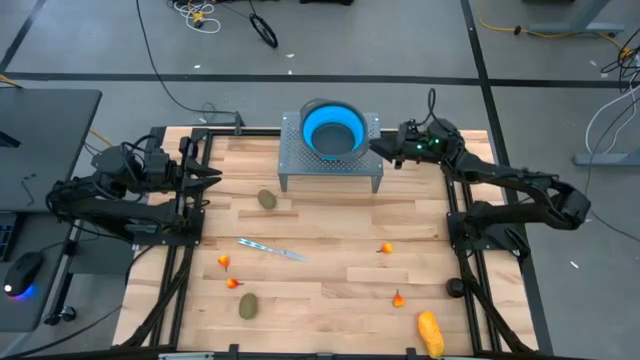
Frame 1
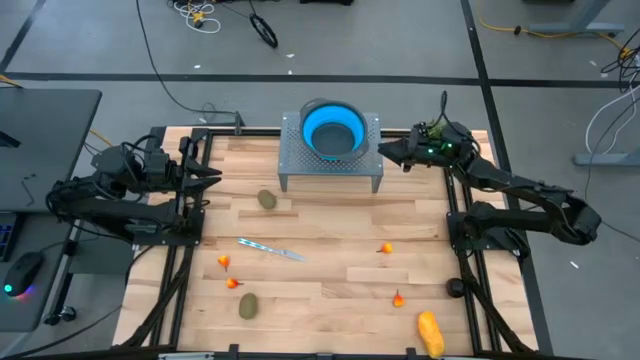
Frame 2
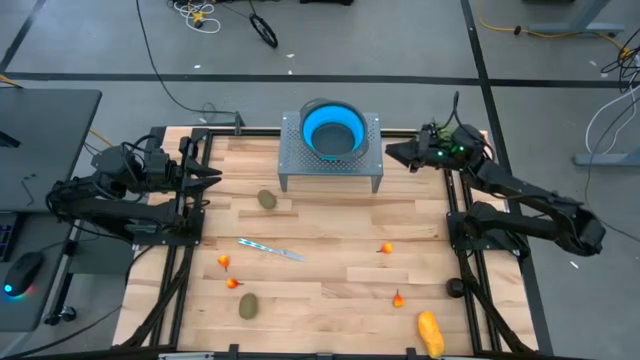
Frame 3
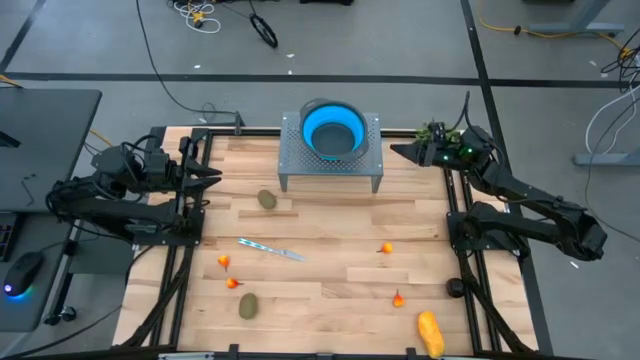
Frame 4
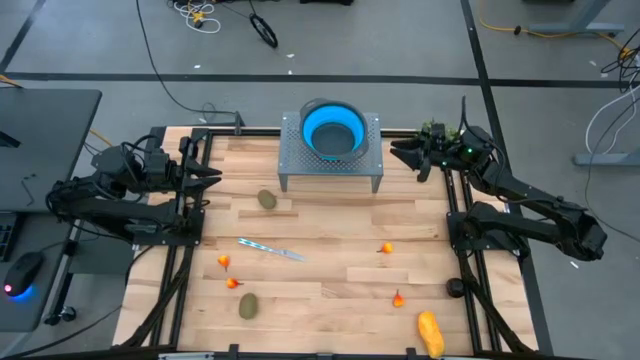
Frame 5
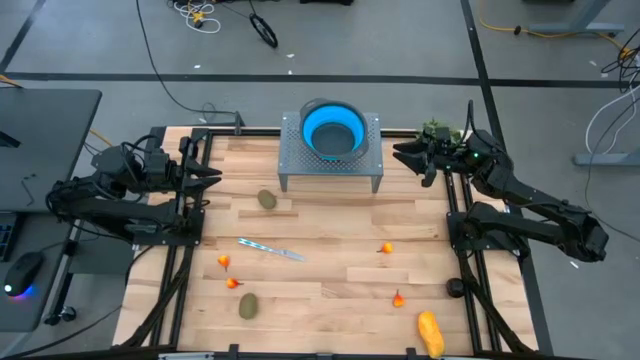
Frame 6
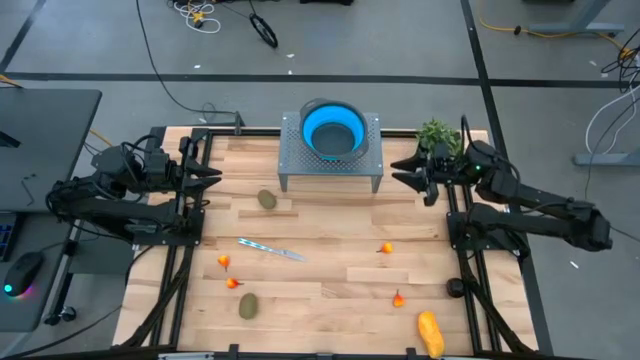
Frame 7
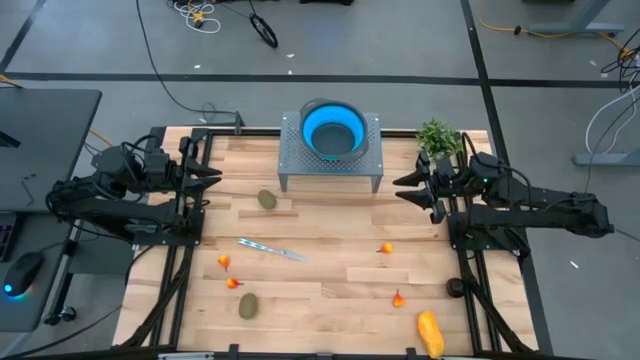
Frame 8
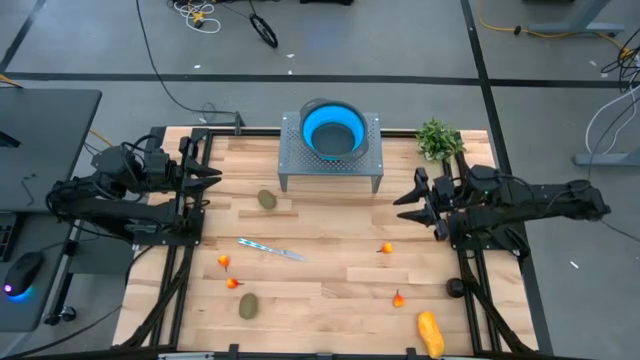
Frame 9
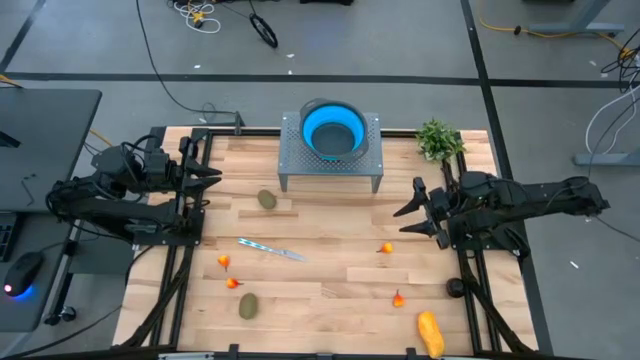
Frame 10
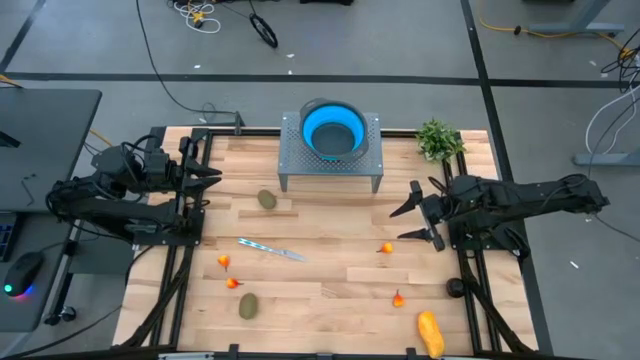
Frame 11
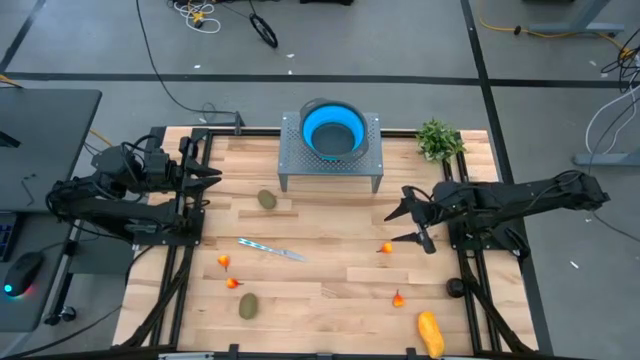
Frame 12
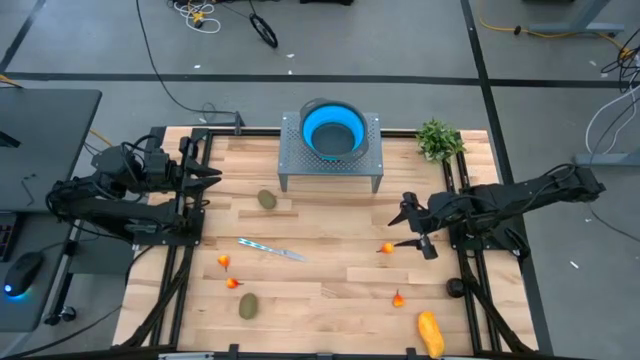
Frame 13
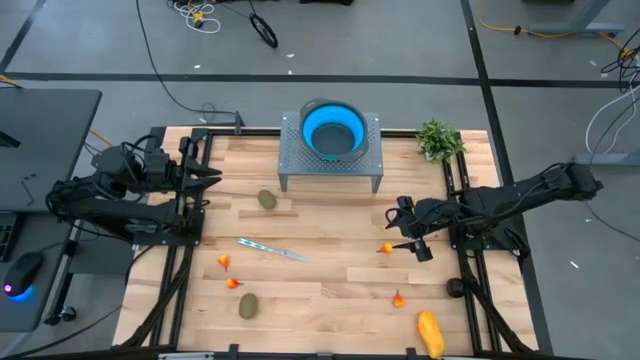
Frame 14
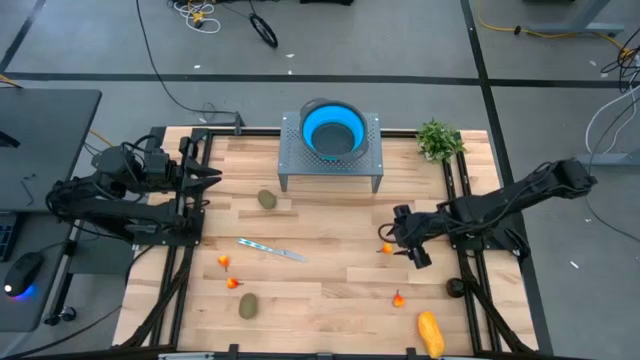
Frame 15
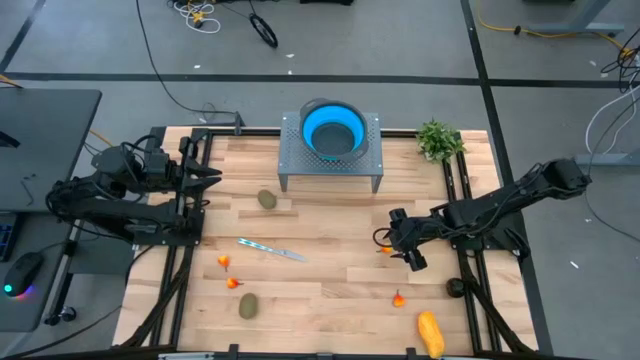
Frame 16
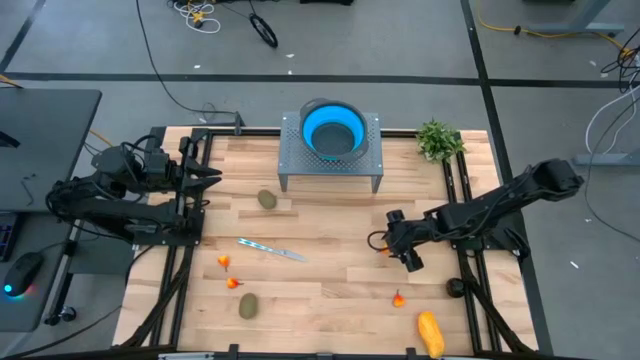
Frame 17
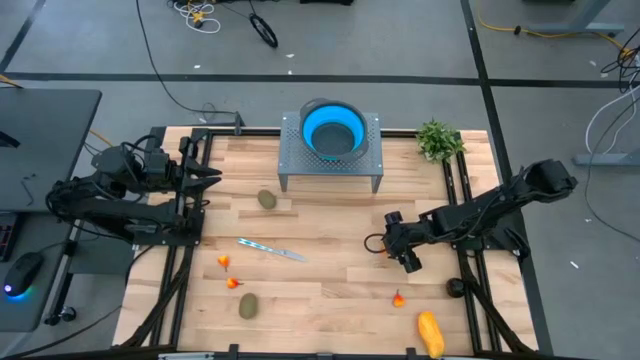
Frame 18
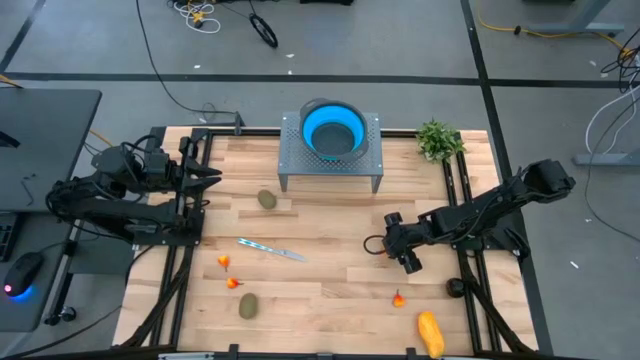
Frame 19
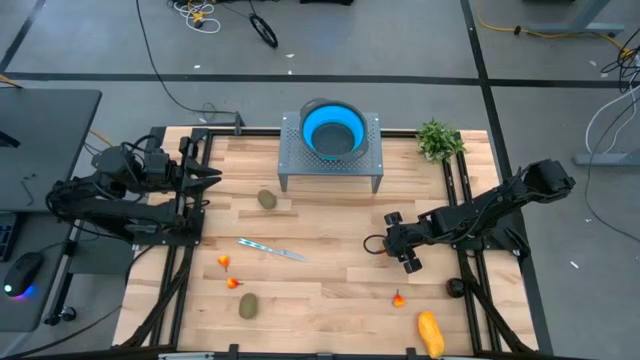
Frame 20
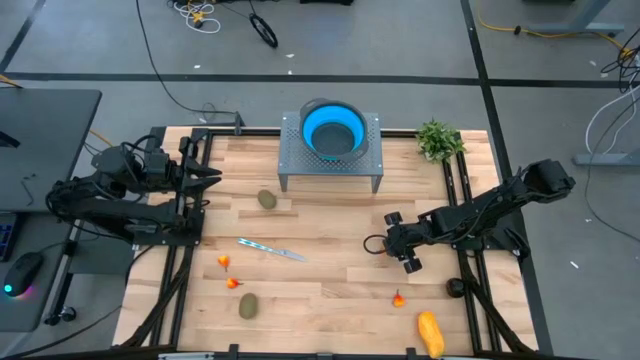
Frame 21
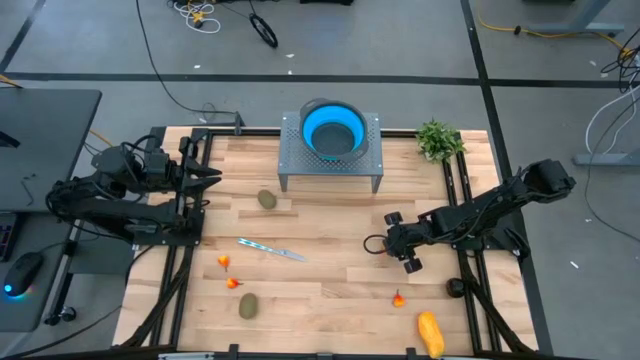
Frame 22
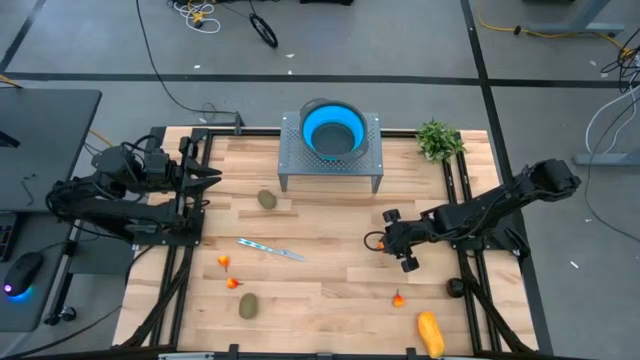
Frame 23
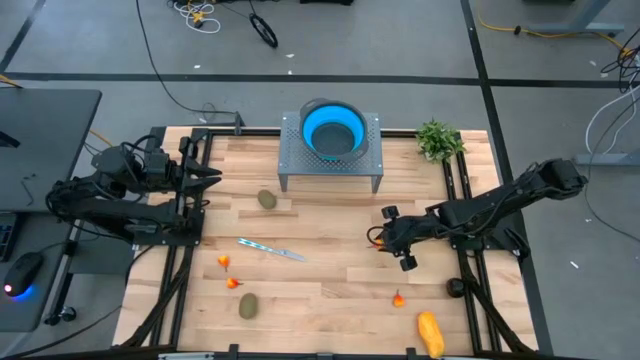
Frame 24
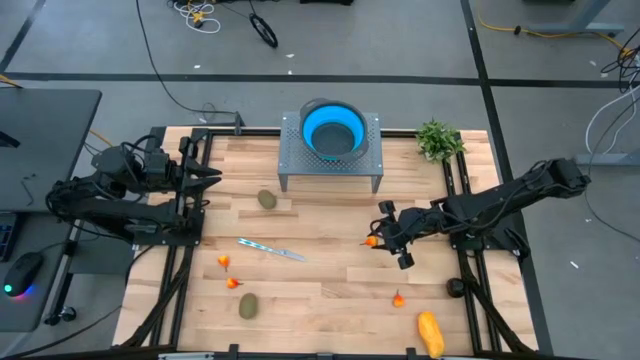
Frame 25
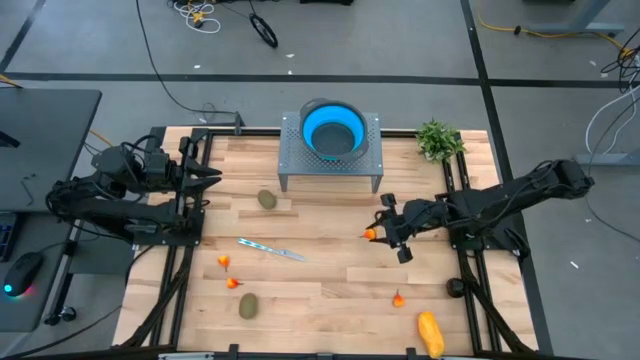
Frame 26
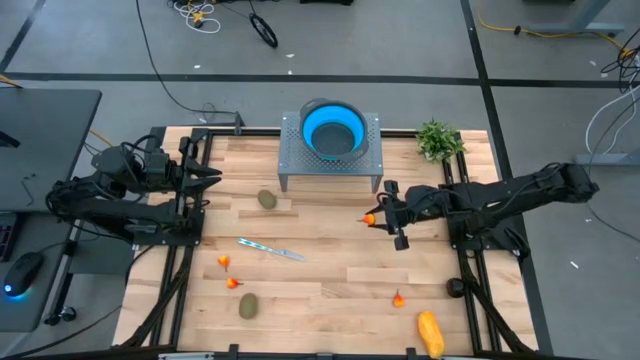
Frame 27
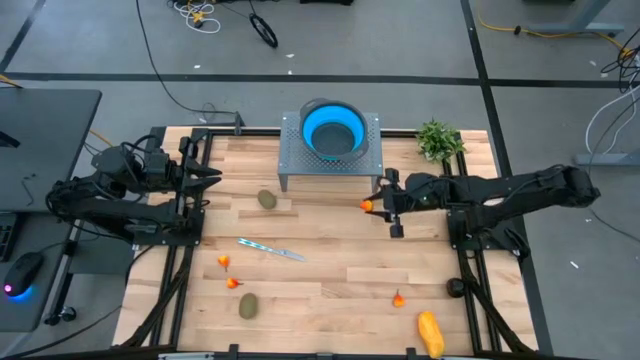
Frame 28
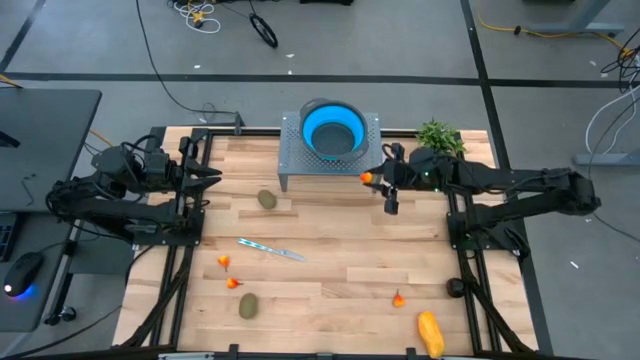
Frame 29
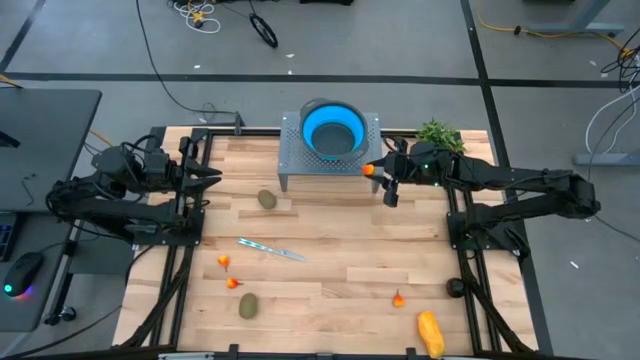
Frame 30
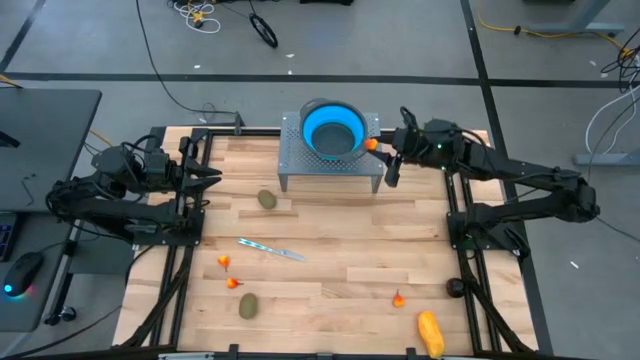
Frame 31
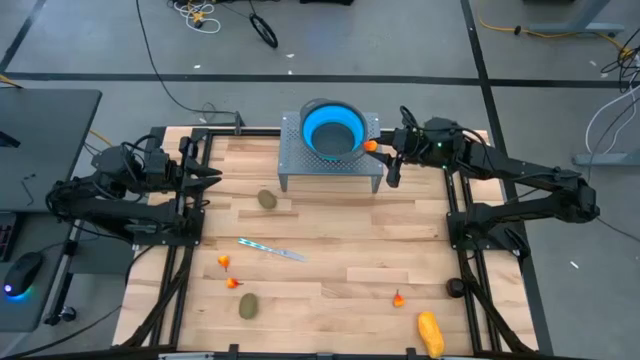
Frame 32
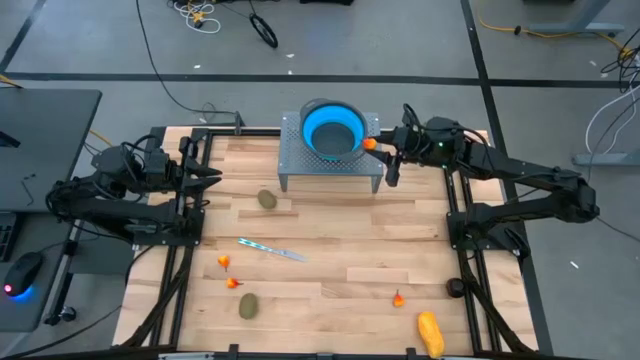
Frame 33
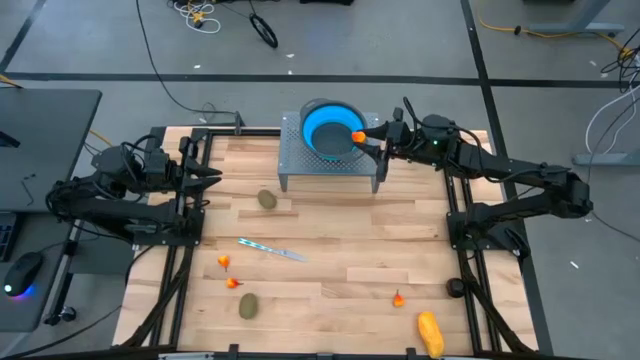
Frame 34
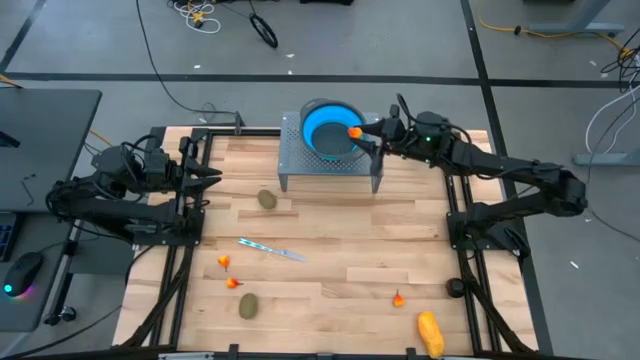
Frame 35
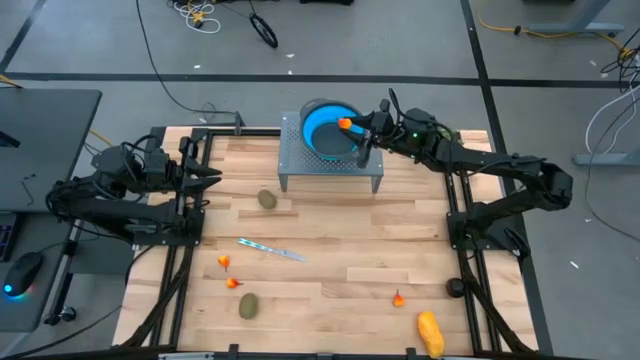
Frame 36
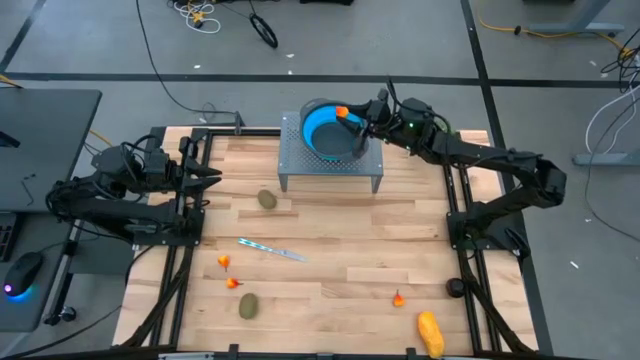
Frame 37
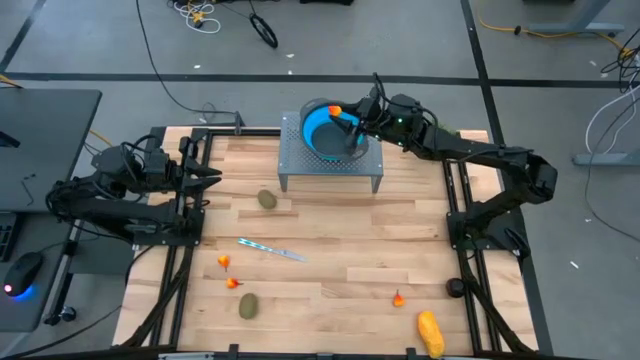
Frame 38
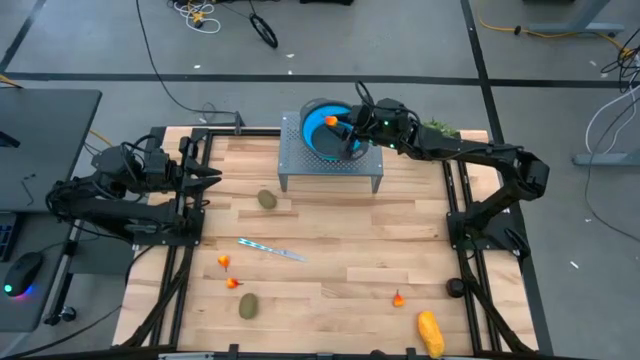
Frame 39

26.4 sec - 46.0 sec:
Task: Pick & Place Fruit
Put the peach into the blue bin
